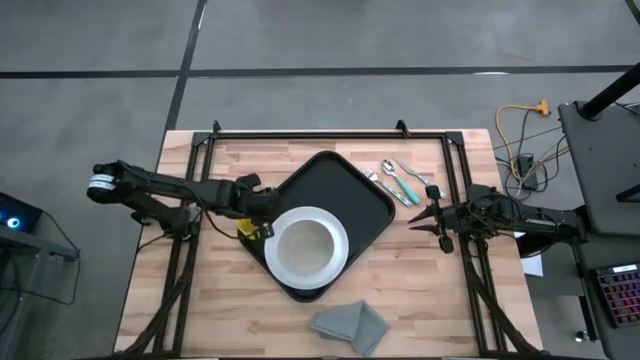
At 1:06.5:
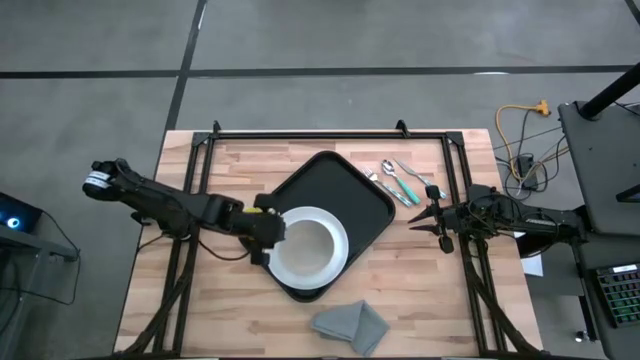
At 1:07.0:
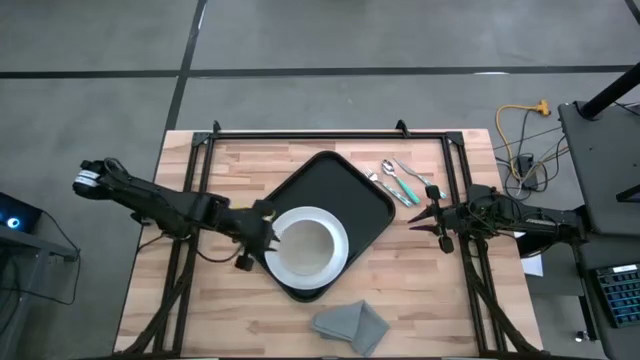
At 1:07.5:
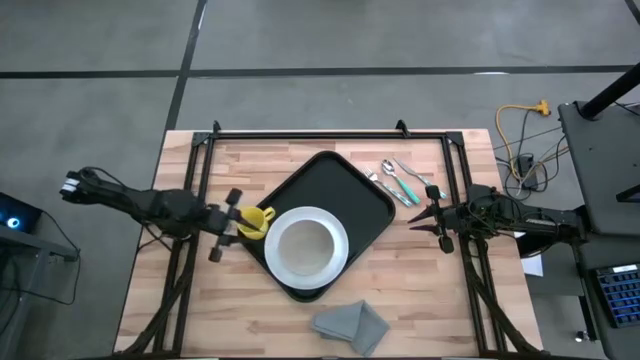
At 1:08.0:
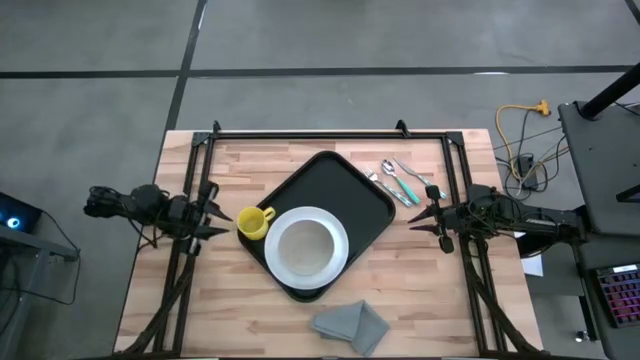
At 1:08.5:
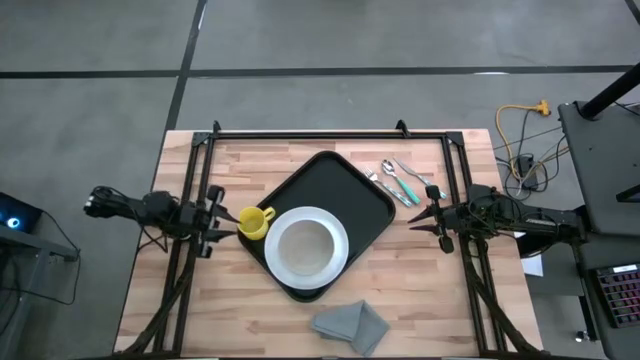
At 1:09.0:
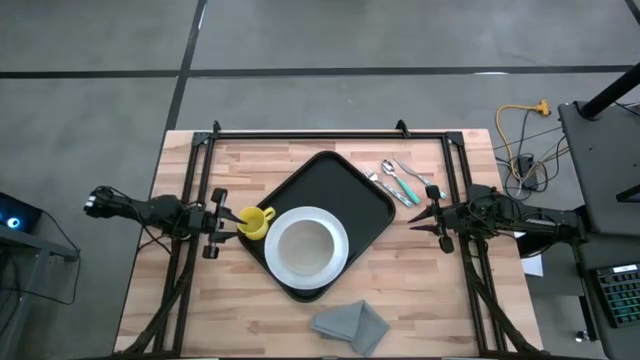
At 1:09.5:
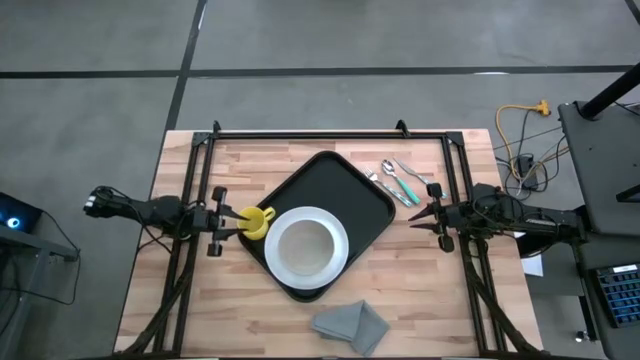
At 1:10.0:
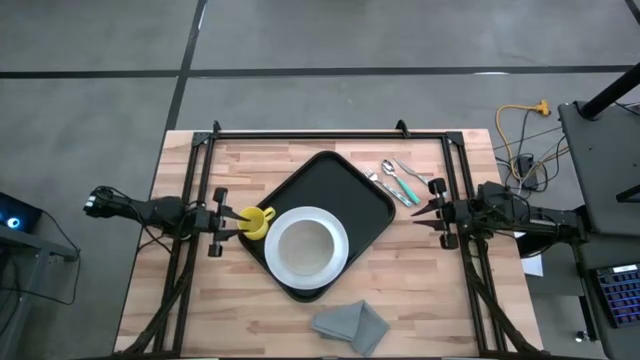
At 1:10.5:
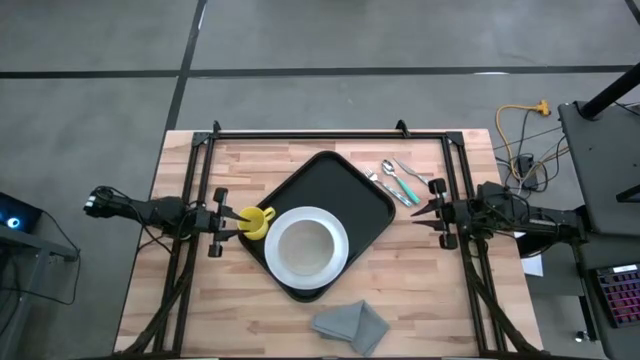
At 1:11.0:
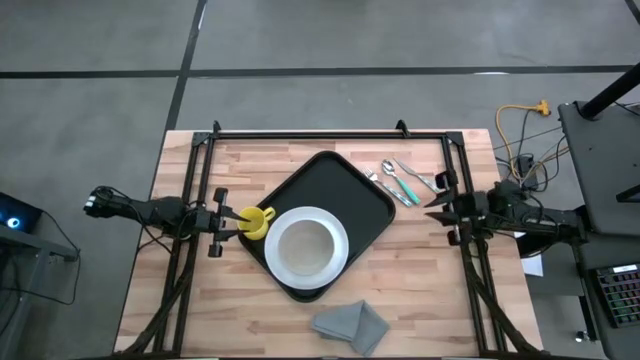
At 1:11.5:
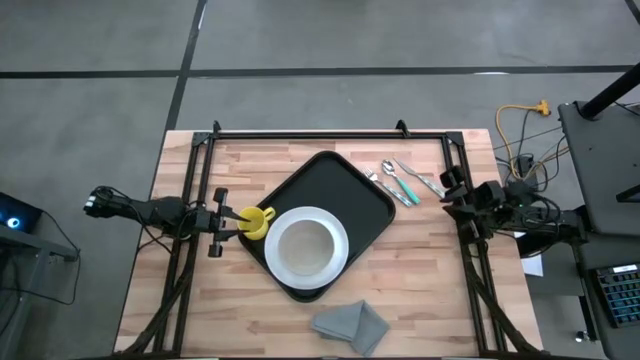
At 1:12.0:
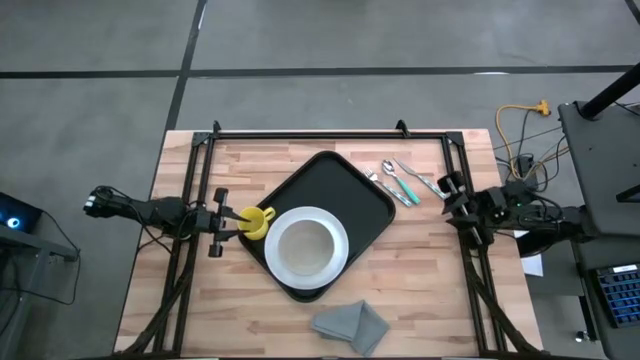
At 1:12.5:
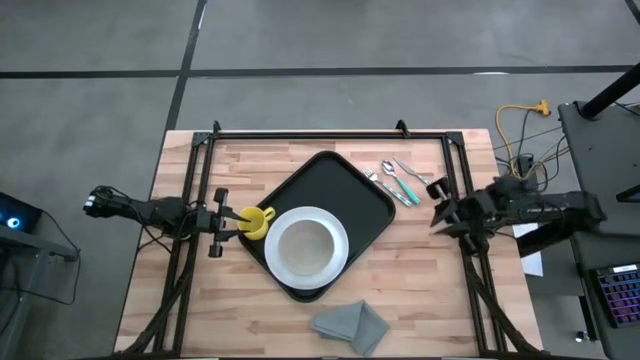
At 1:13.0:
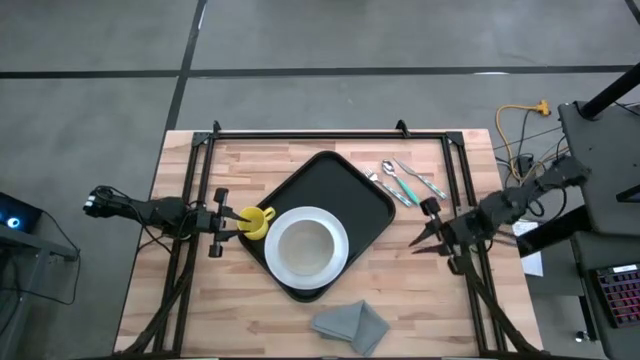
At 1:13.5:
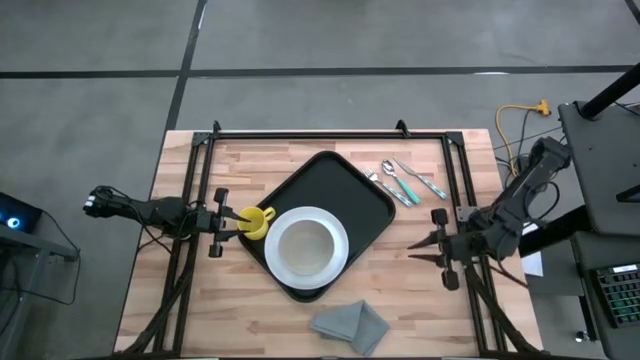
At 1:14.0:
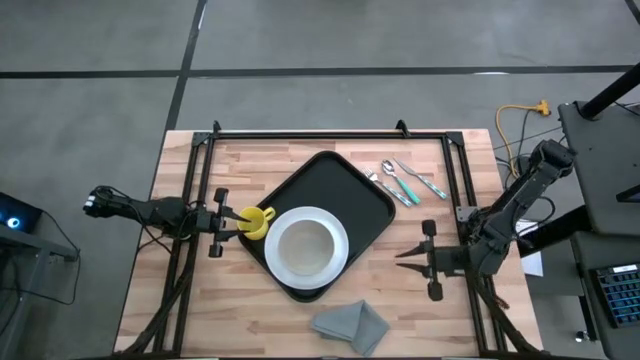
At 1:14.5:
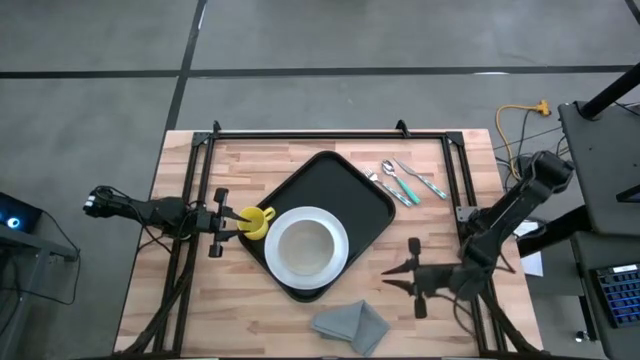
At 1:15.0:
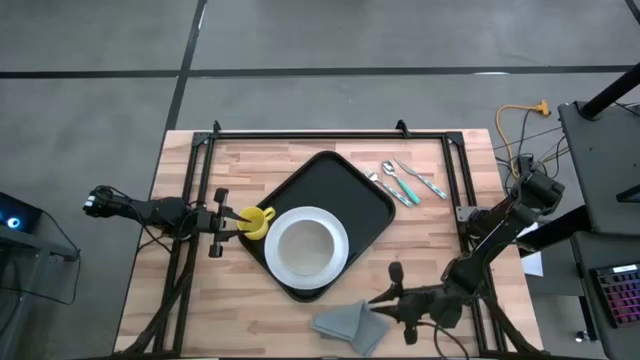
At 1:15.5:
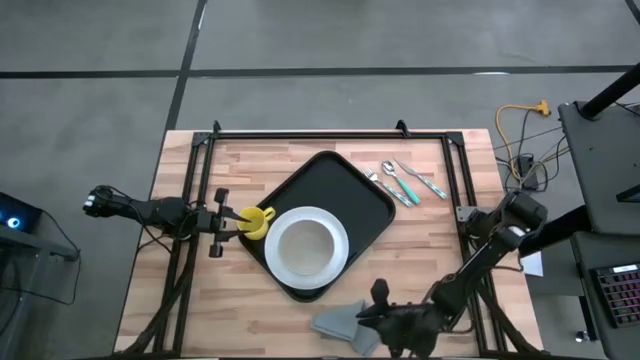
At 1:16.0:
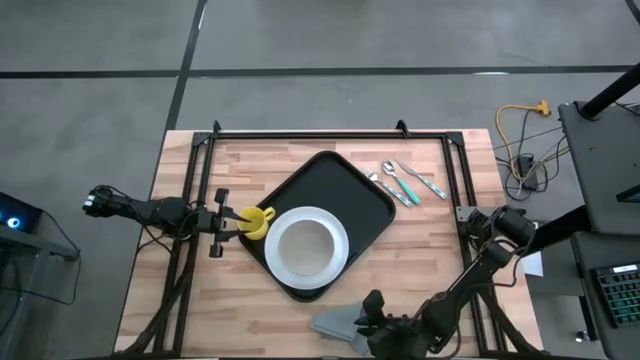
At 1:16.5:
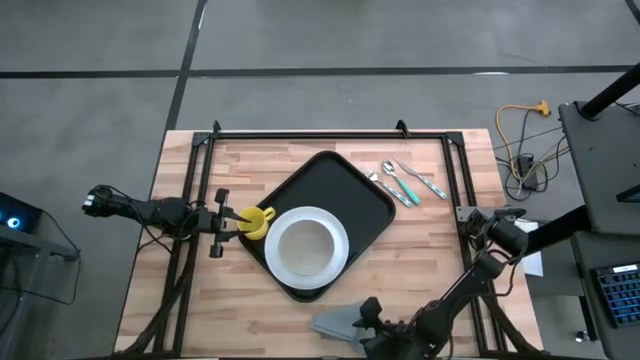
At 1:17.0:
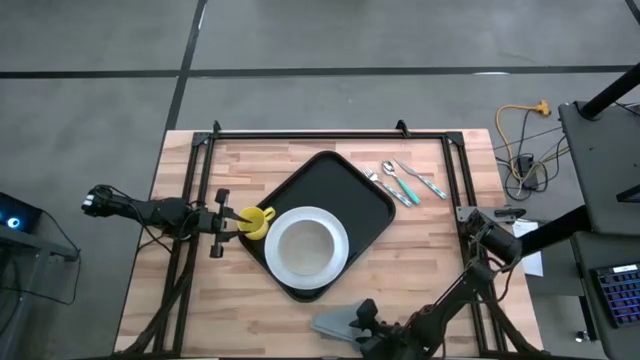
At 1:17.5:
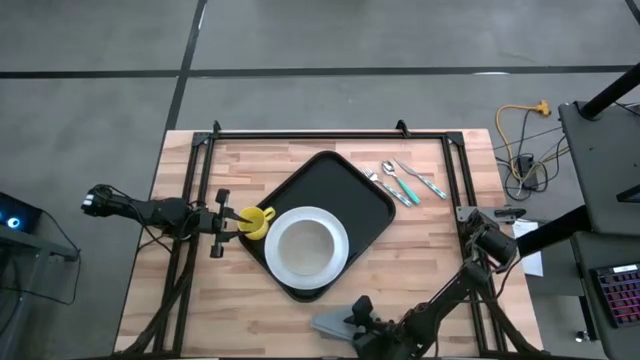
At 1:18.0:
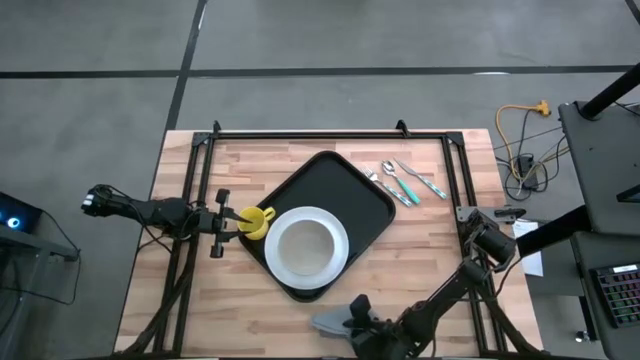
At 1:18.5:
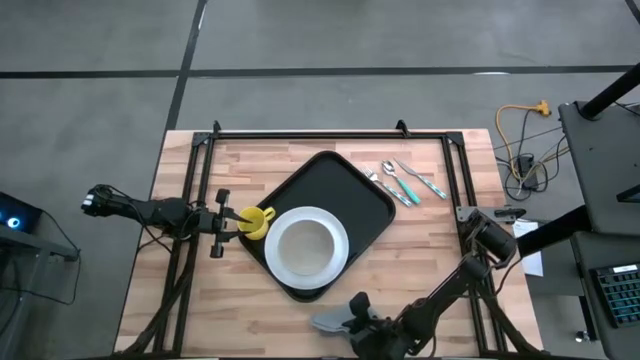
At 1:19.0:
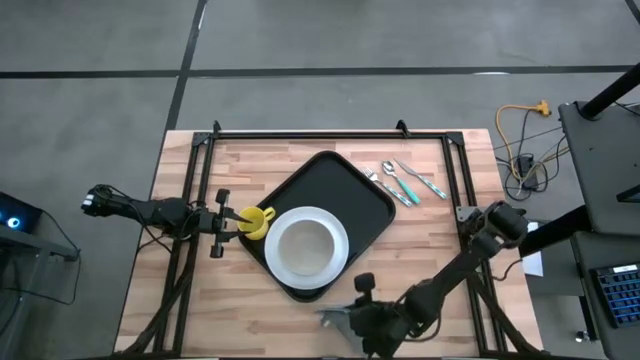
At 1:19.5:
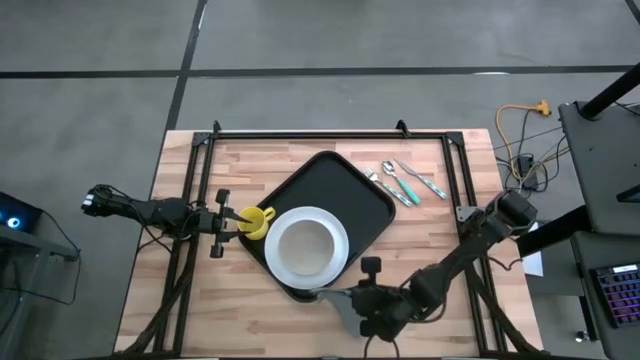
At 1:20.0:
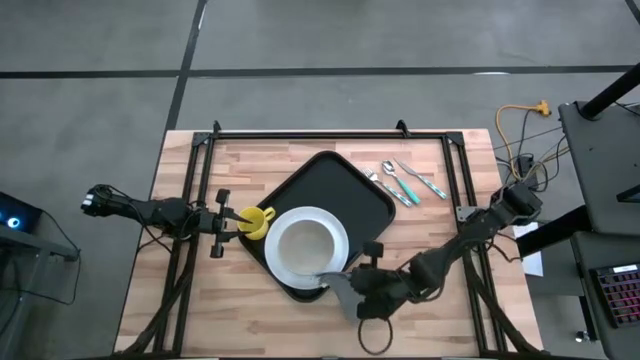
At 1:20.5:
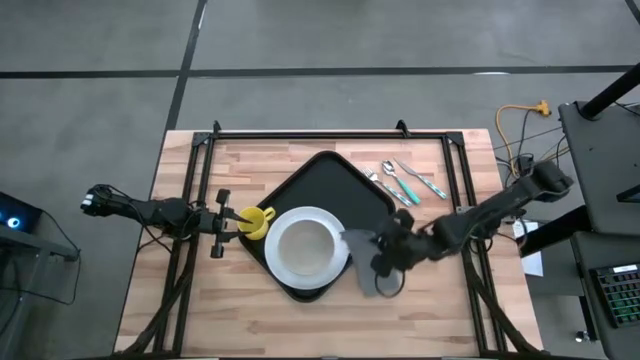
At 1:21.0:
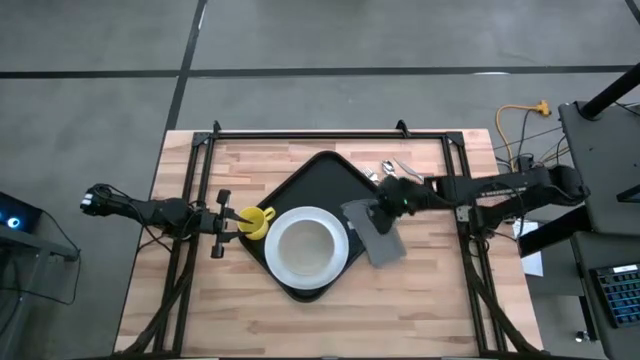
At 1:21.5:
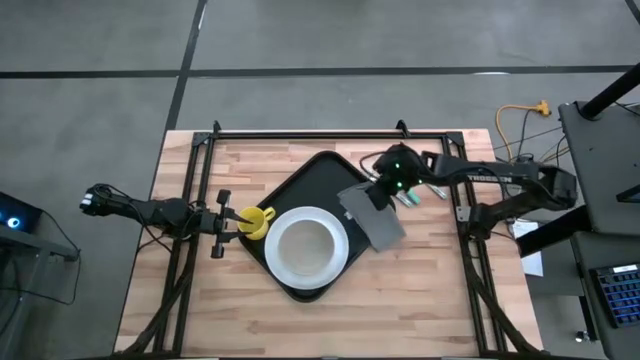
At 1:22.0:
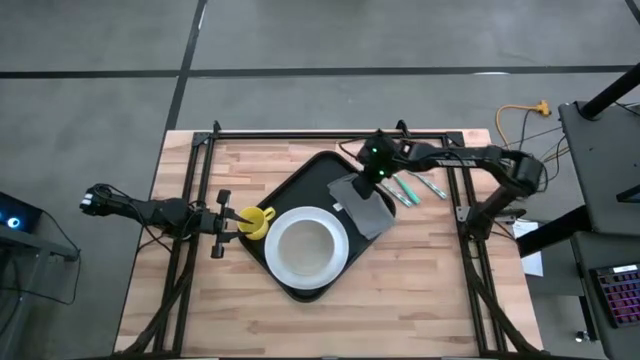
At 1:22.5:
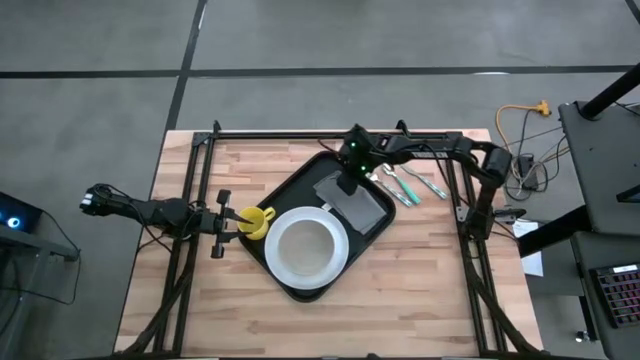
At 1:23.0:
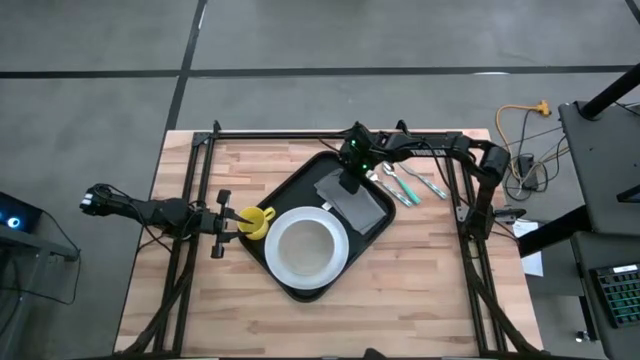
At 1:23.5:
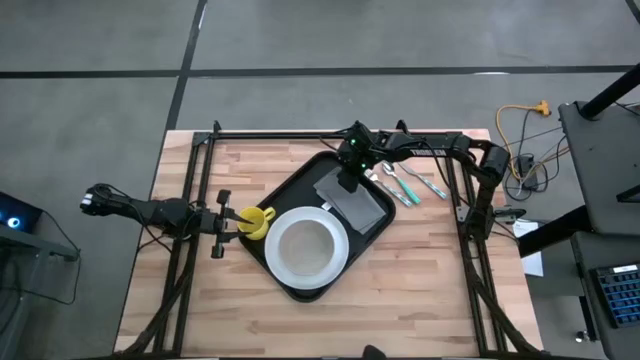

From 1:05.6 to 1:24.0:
Task: Set up tray
Put the gray napkin to the right of the white plate on the black serving tray
